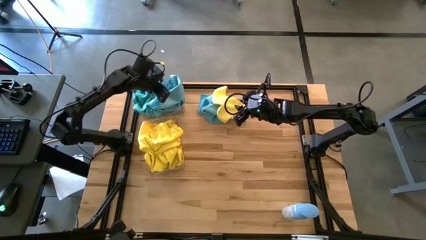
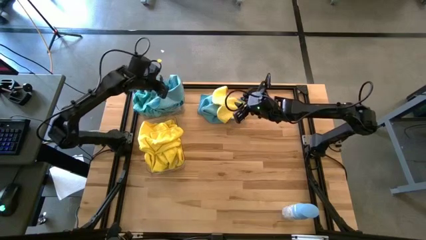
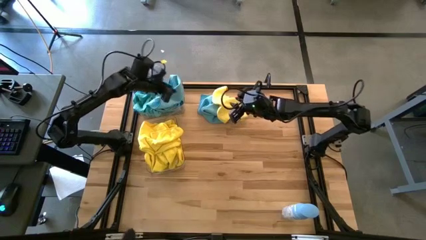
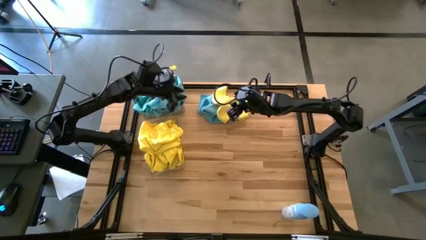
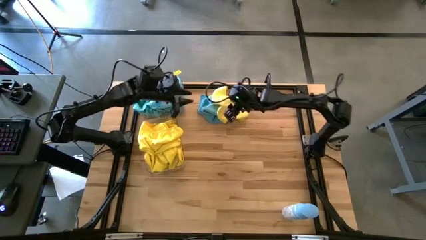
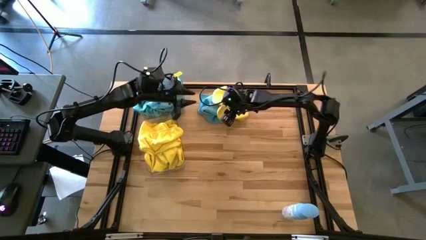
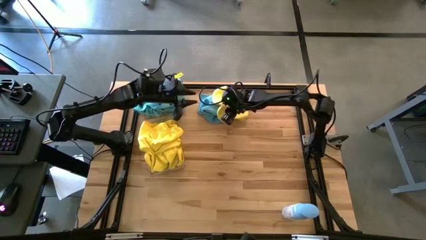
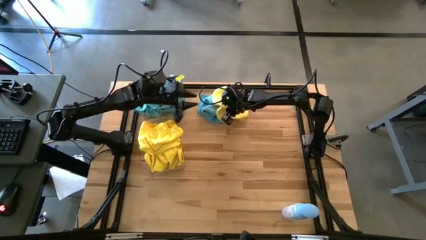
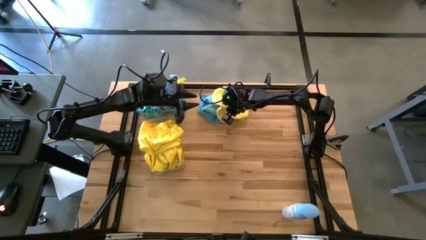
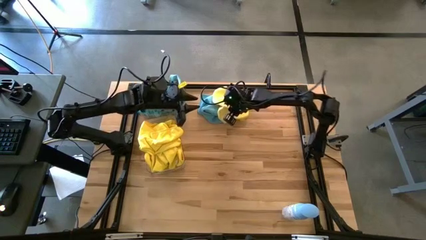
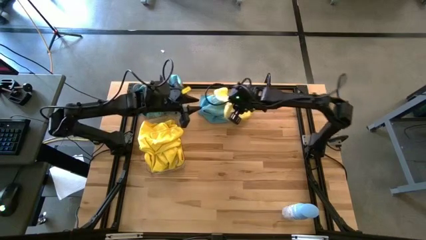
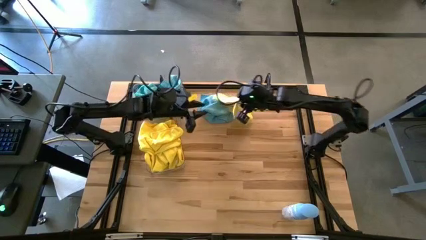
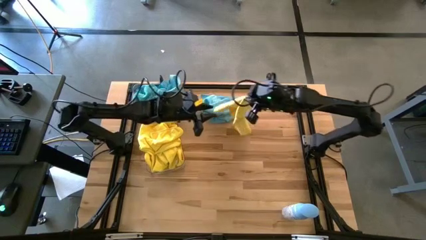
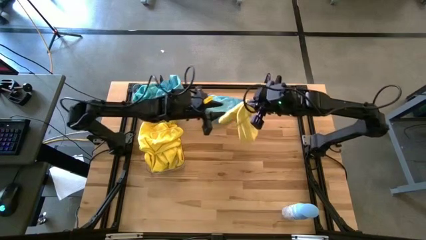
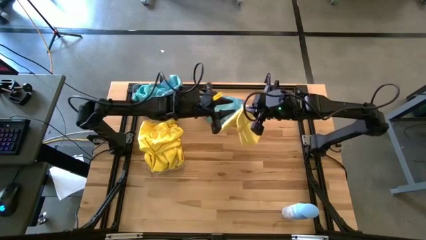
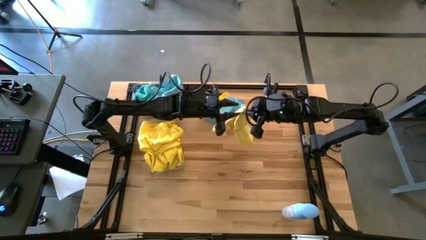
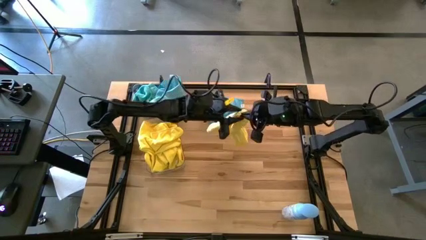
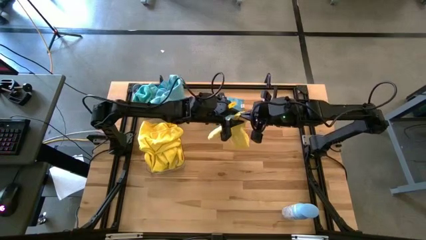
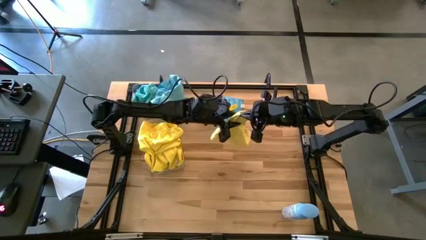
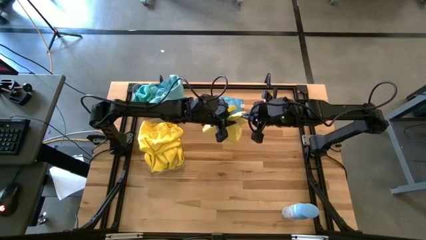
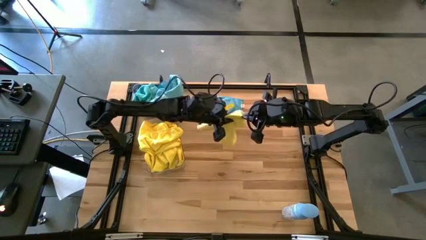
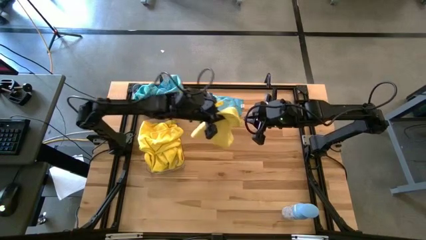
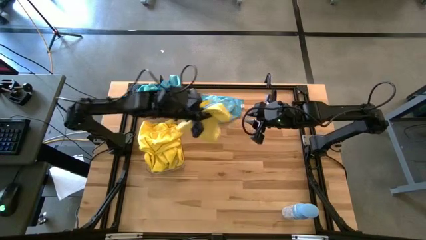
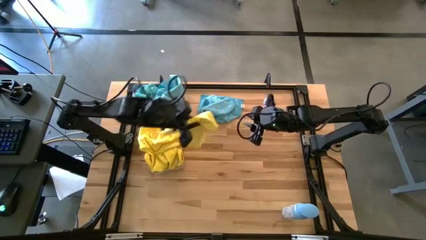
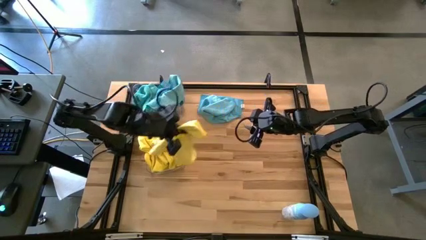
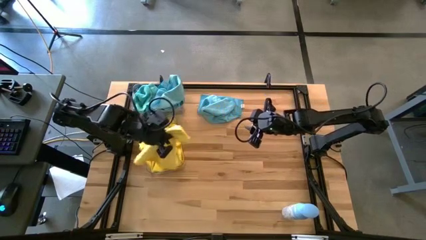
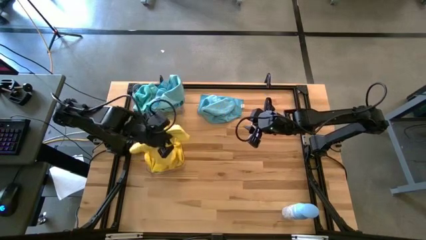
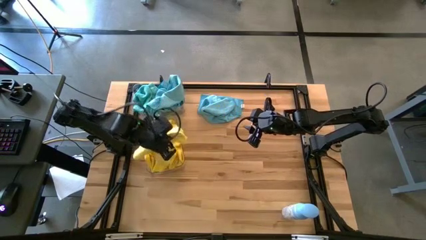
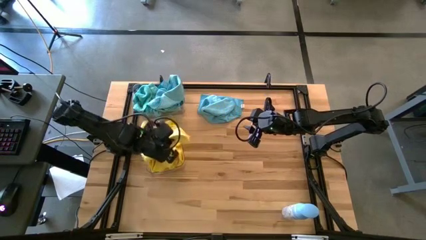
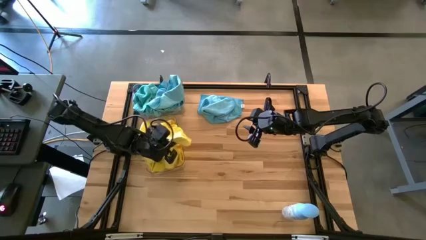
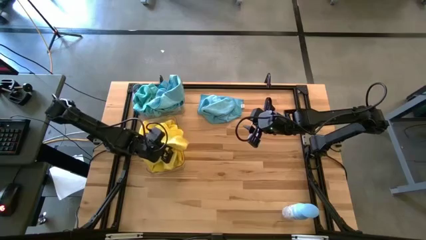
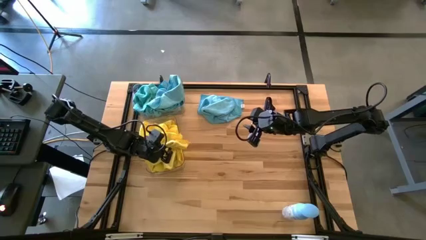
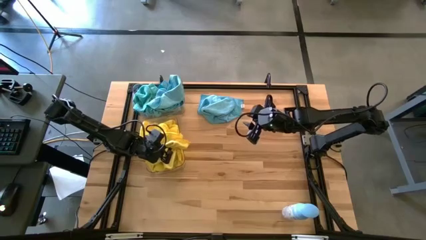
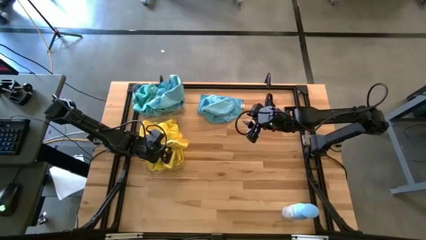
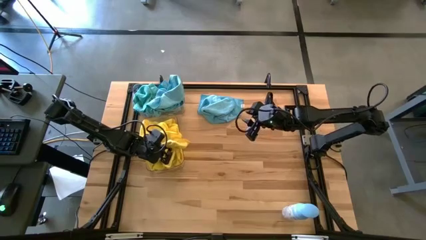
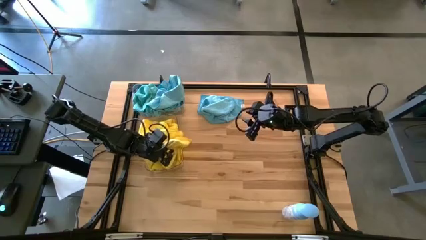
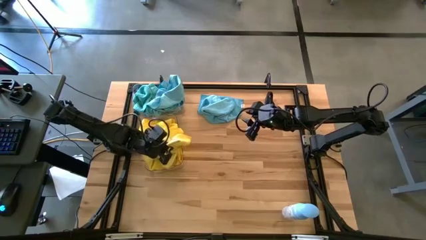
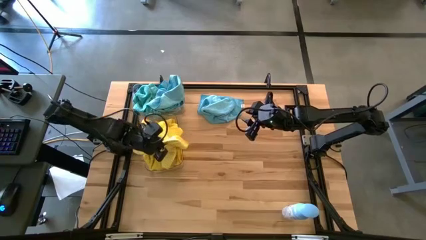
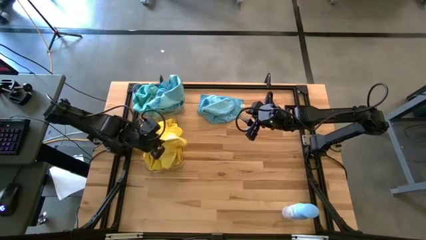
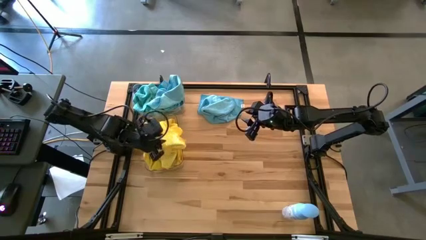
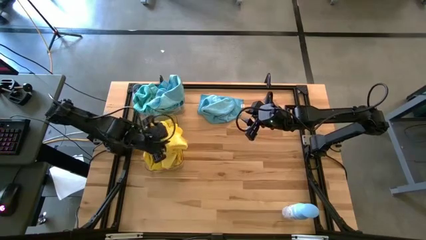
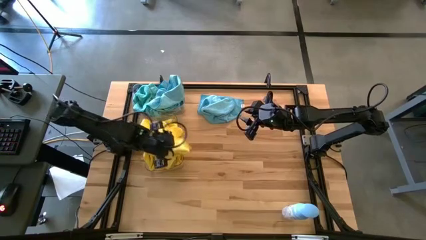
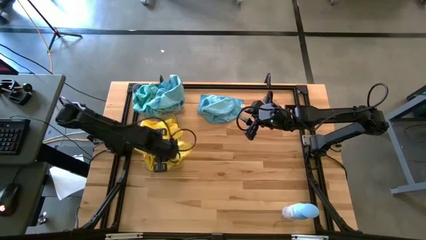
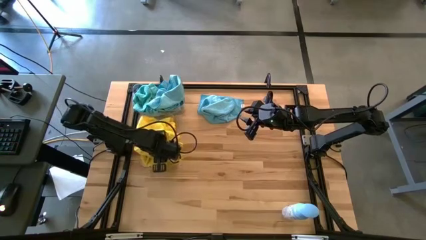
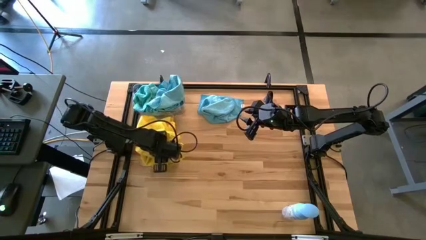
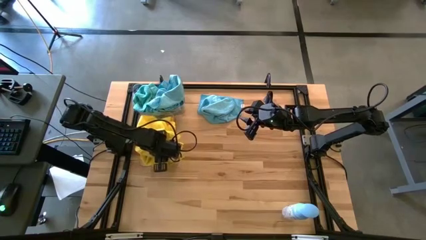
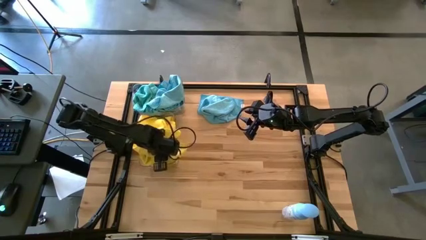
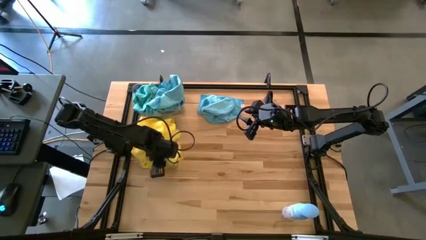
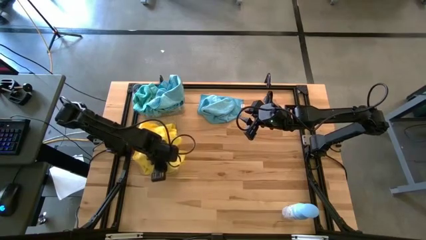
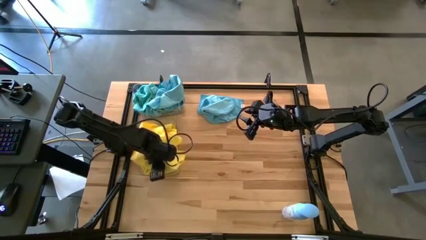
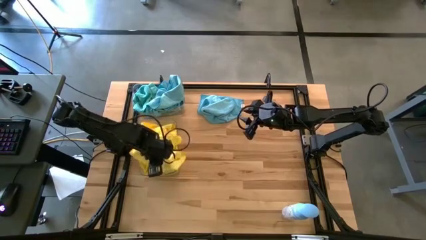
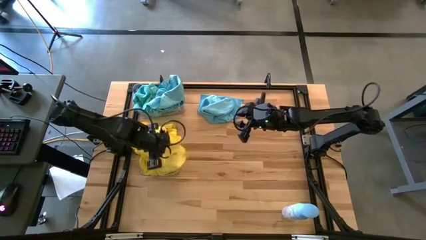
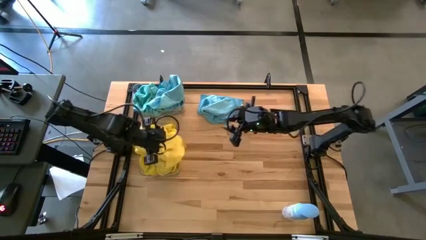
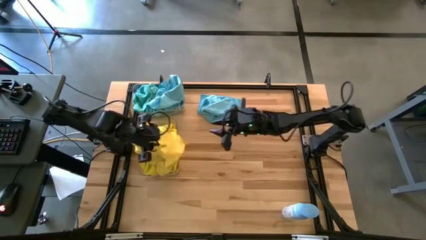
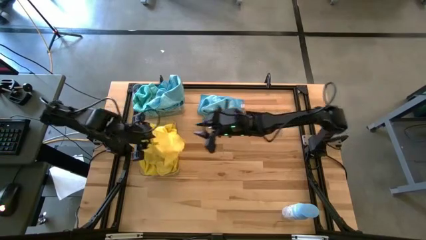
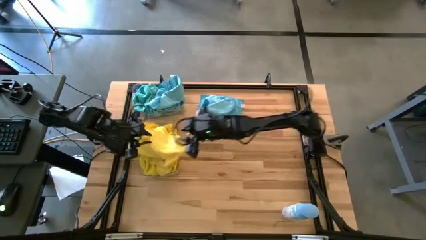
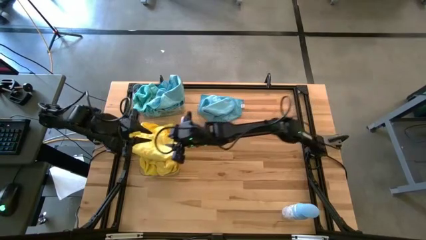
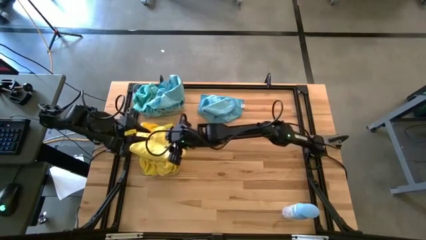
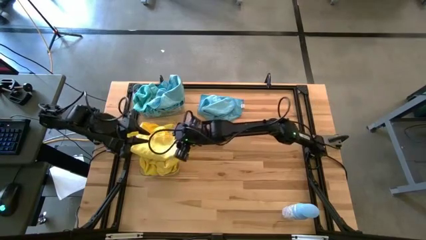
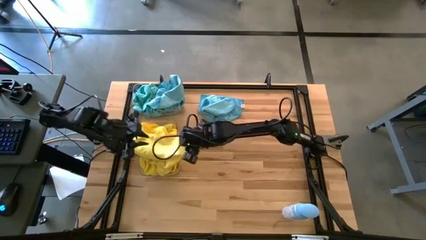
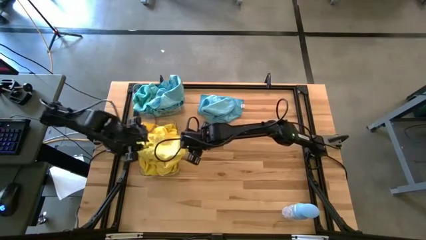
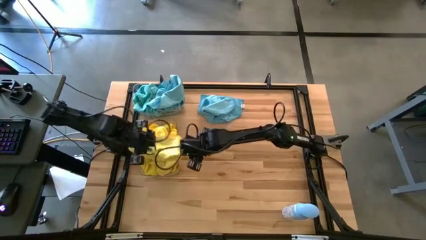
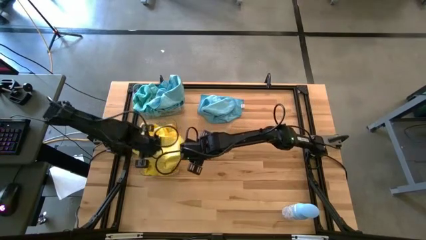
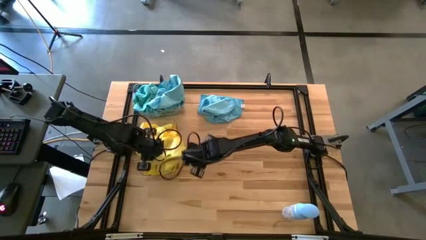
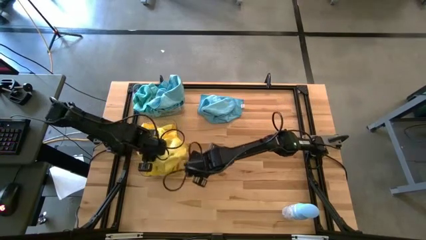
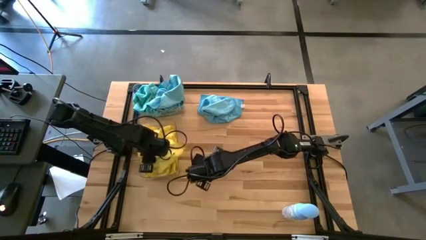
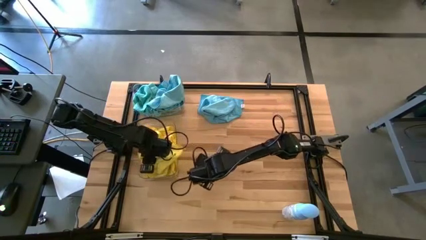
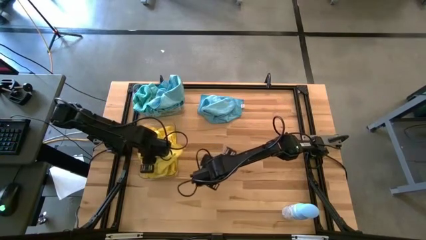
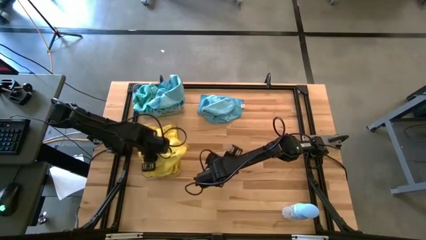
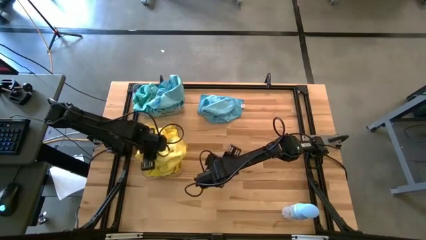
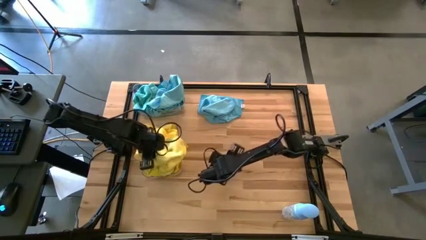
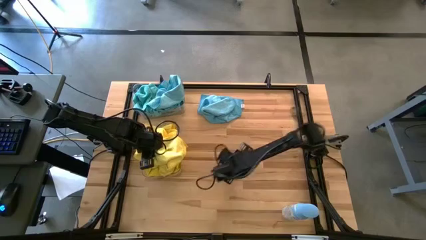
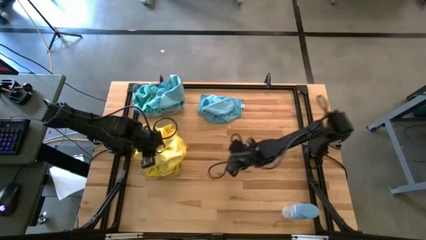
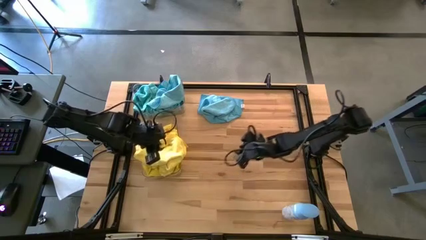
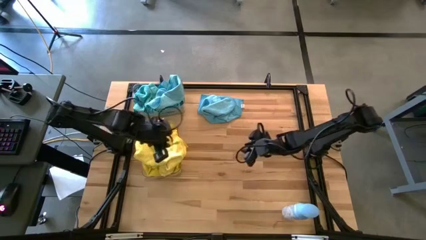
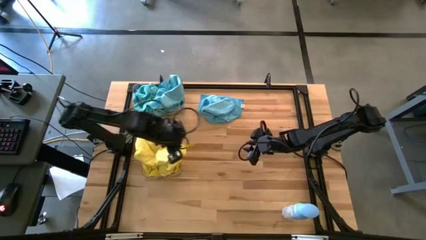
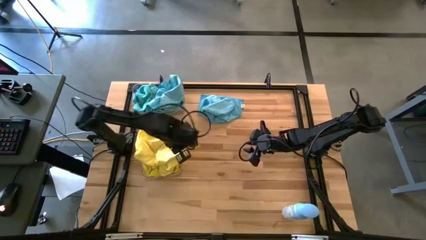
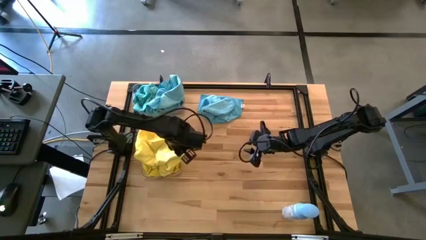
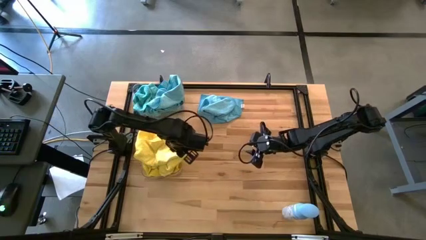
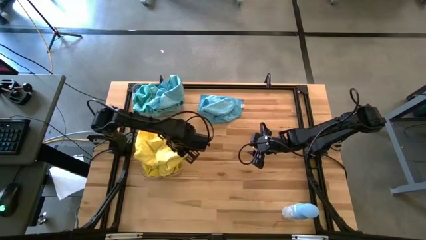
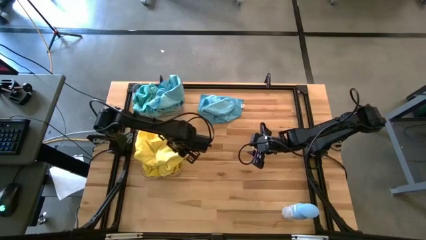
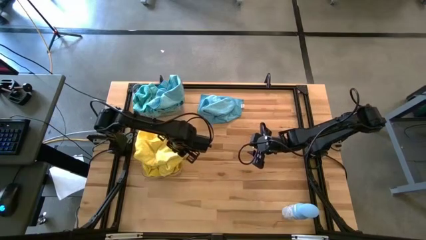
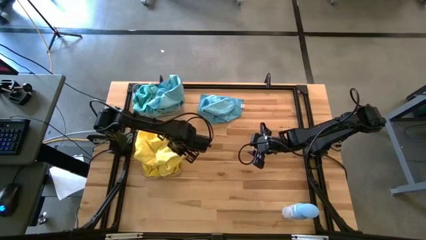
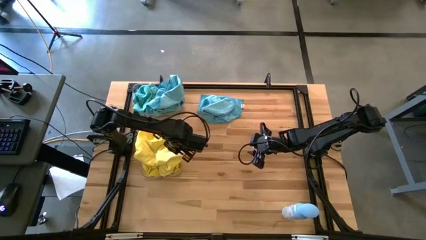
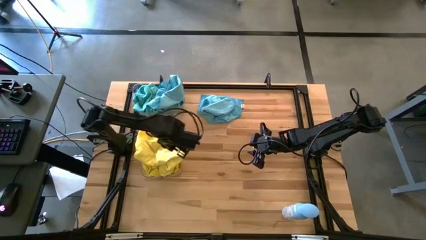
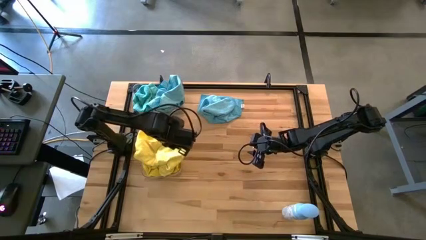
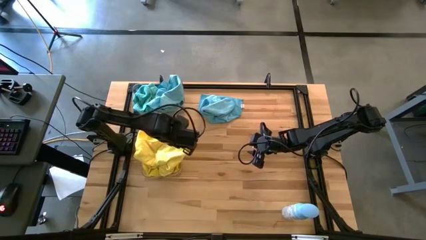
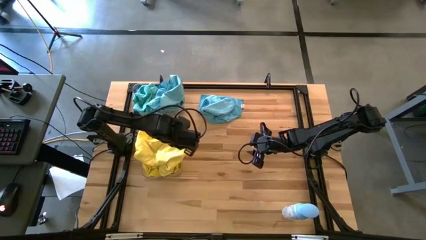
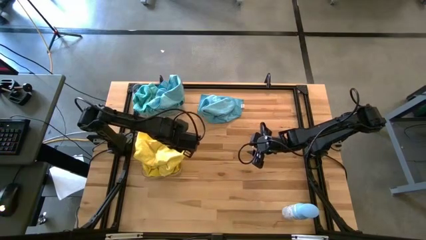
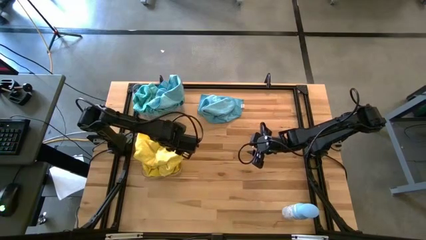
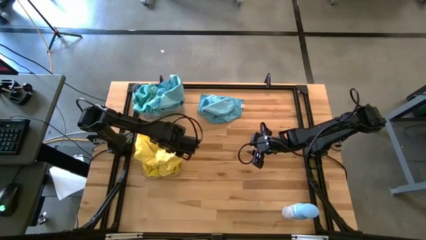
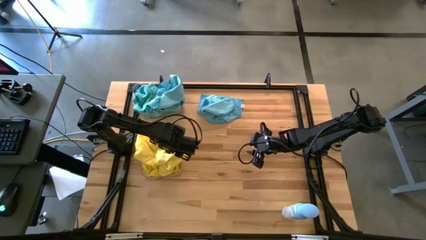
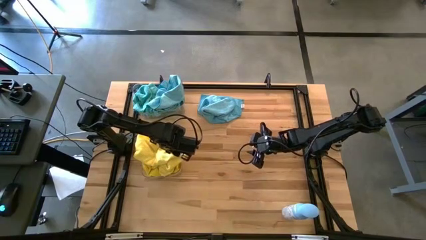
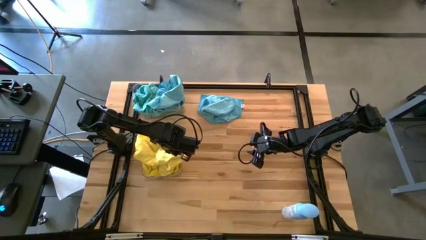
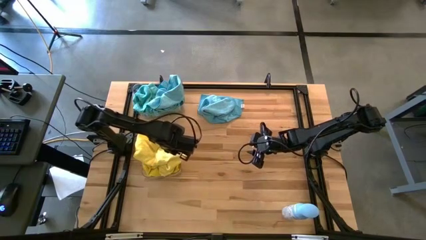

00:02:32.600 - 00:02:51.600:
Task: Sort microfiber towel by color & place in baskets
Put the yellow microfiber cloth into the bottom transparent bin
